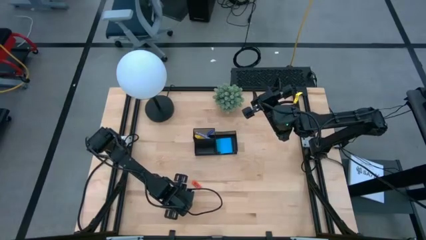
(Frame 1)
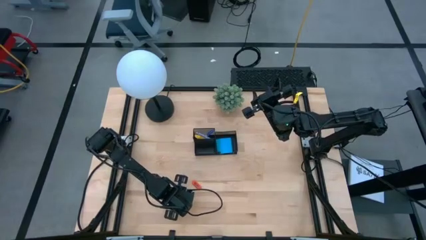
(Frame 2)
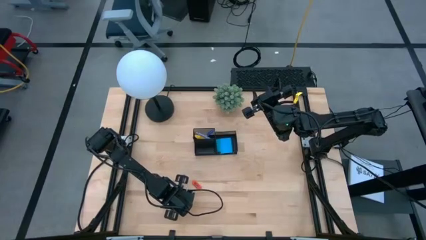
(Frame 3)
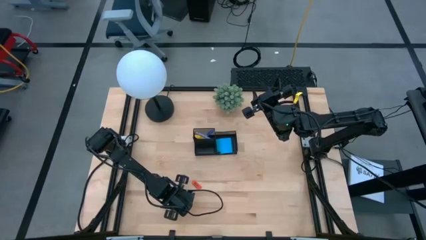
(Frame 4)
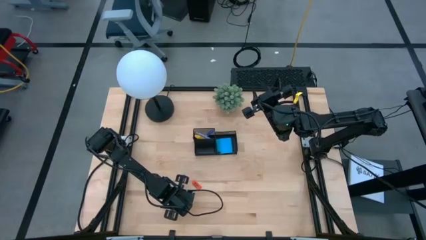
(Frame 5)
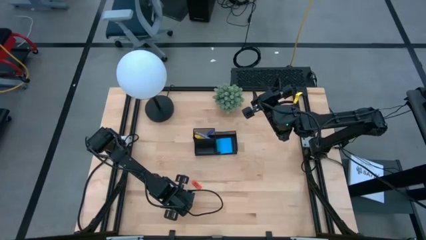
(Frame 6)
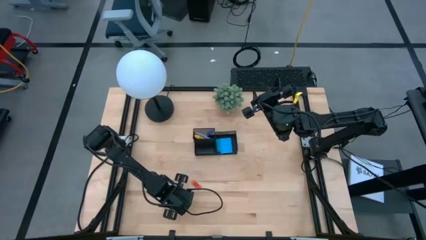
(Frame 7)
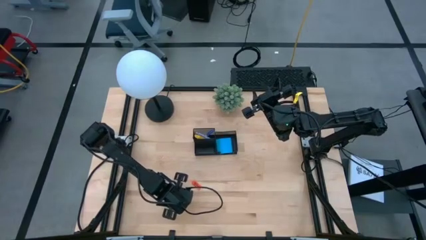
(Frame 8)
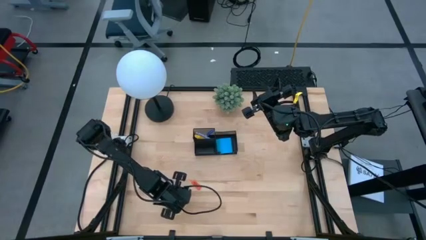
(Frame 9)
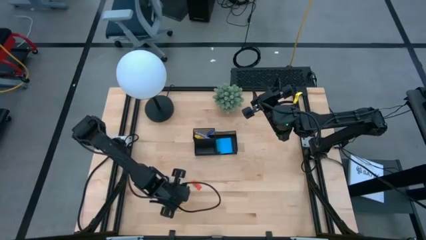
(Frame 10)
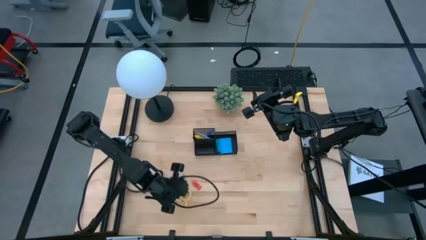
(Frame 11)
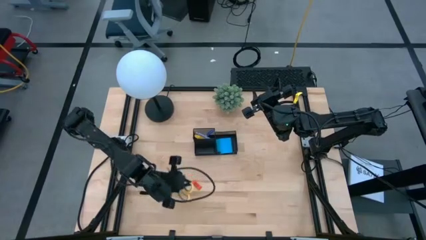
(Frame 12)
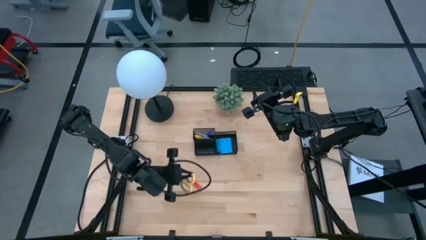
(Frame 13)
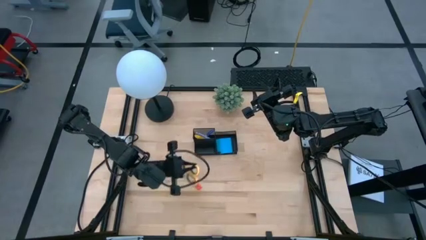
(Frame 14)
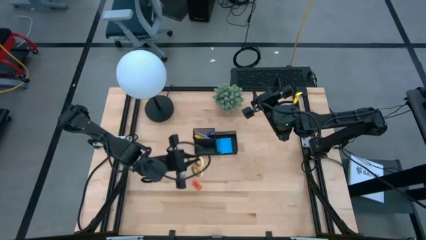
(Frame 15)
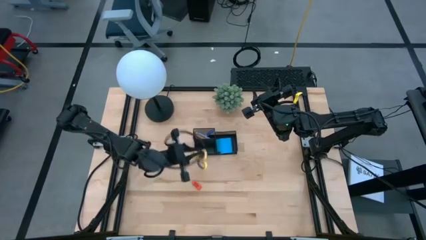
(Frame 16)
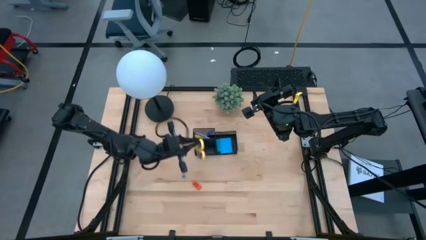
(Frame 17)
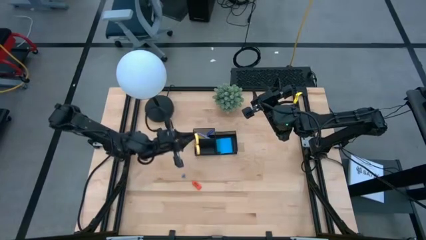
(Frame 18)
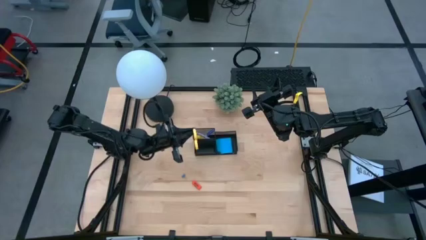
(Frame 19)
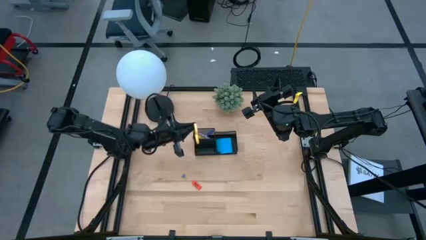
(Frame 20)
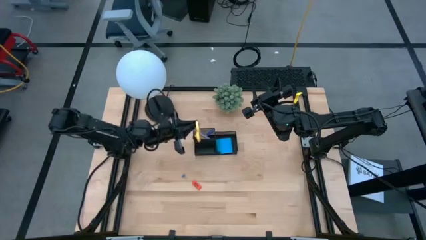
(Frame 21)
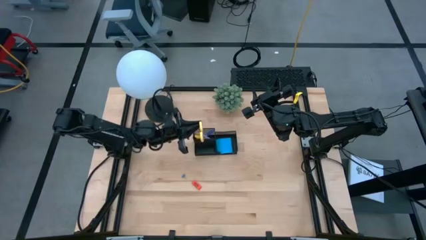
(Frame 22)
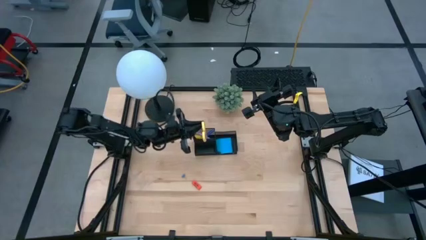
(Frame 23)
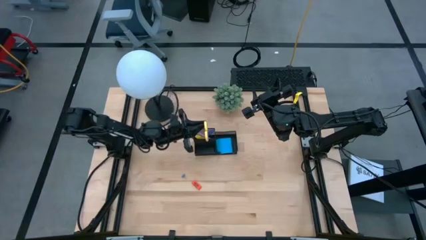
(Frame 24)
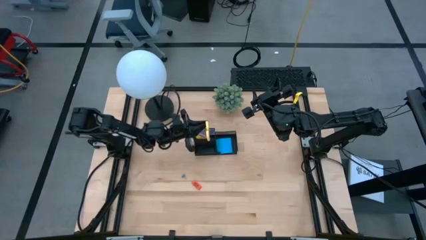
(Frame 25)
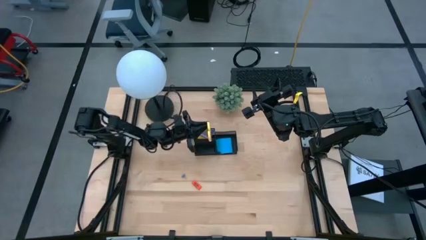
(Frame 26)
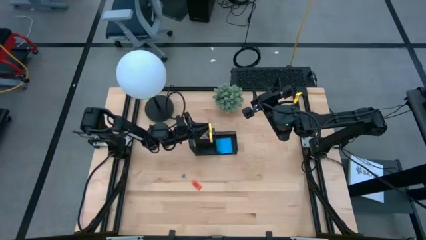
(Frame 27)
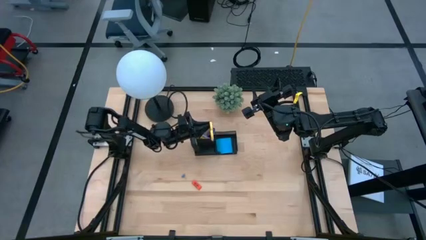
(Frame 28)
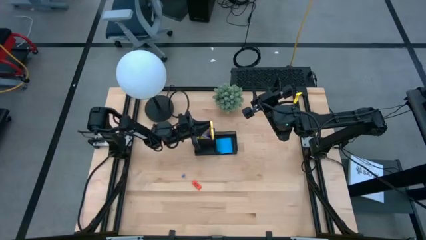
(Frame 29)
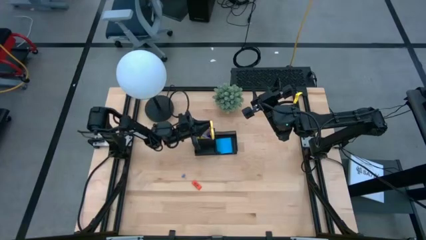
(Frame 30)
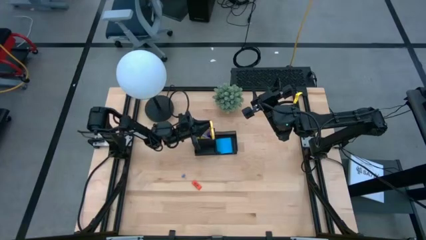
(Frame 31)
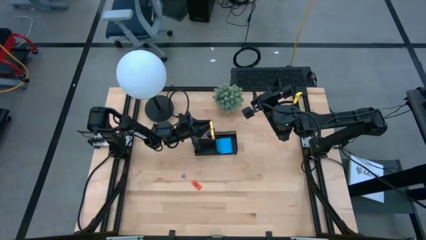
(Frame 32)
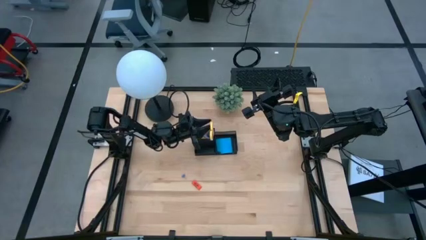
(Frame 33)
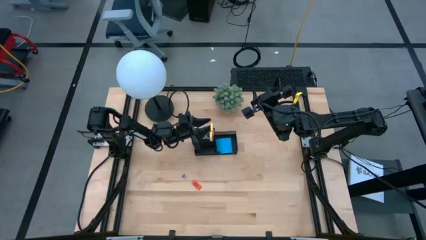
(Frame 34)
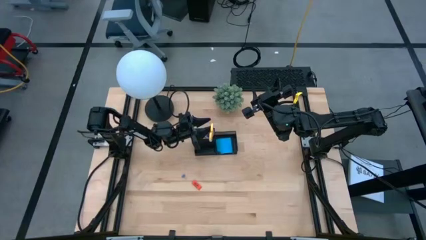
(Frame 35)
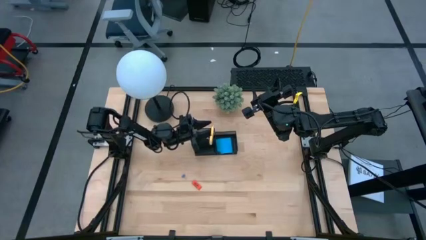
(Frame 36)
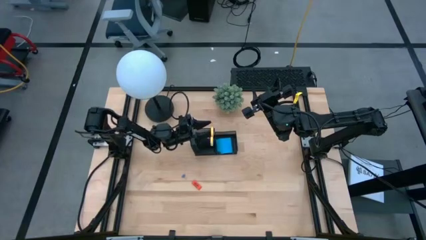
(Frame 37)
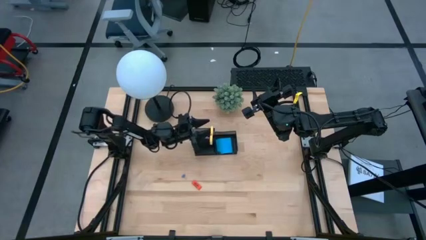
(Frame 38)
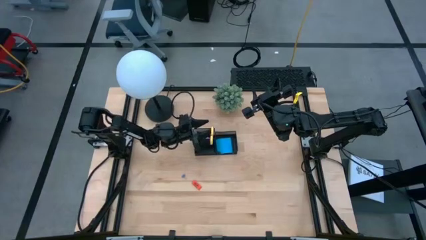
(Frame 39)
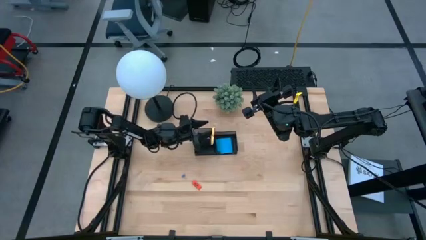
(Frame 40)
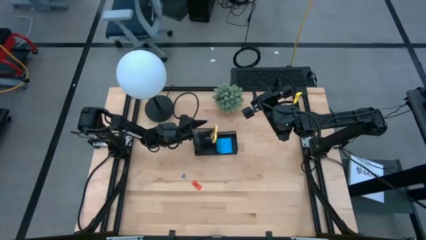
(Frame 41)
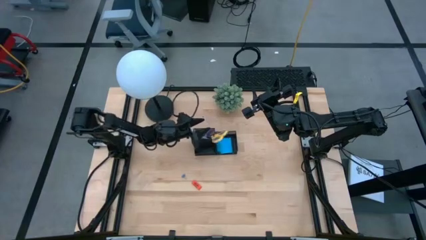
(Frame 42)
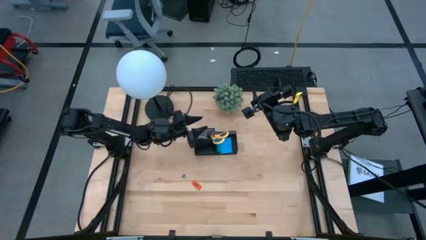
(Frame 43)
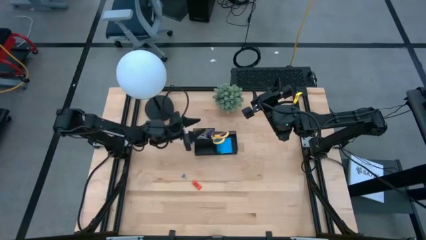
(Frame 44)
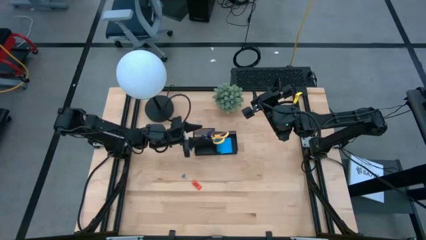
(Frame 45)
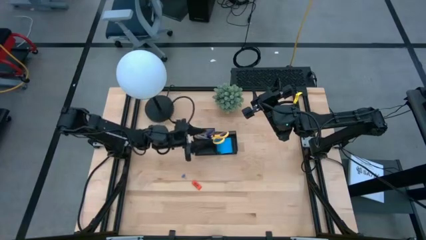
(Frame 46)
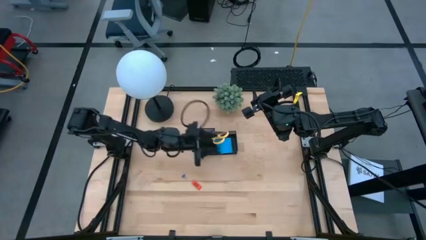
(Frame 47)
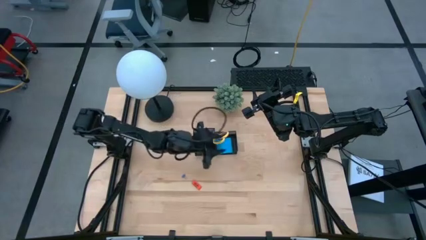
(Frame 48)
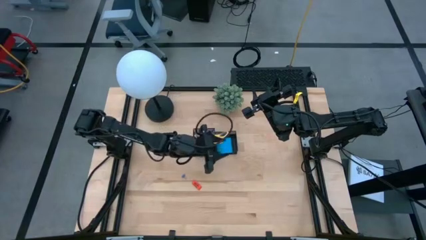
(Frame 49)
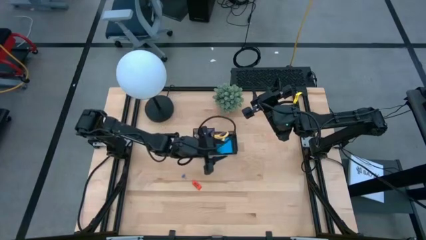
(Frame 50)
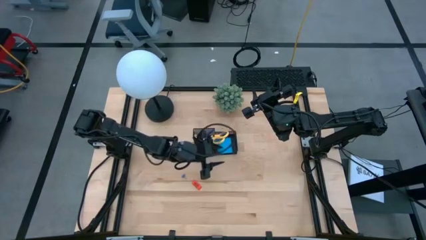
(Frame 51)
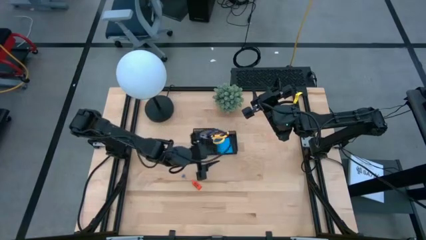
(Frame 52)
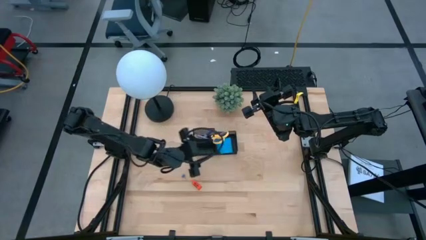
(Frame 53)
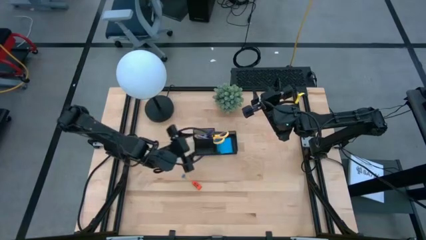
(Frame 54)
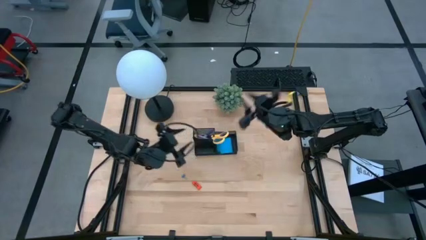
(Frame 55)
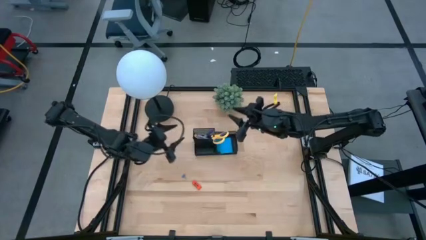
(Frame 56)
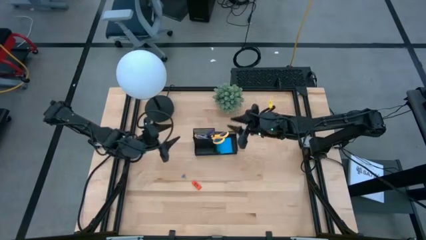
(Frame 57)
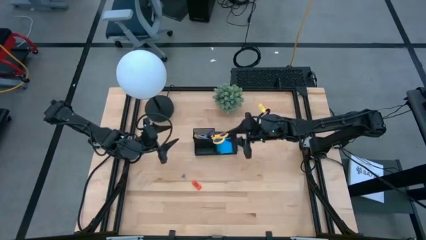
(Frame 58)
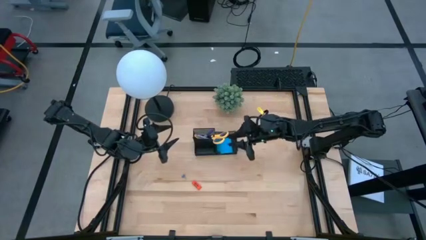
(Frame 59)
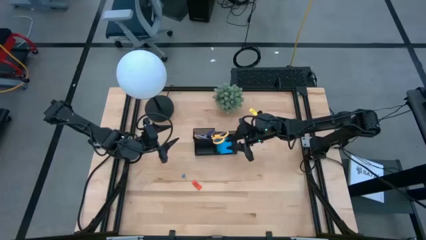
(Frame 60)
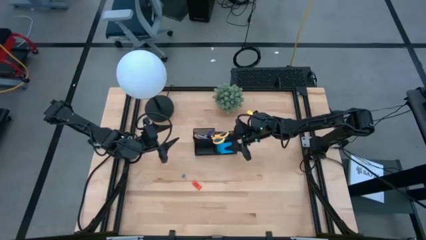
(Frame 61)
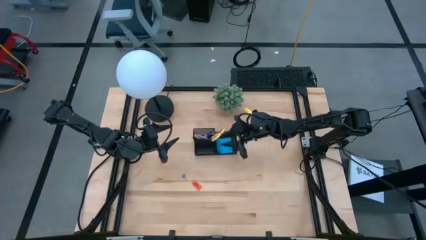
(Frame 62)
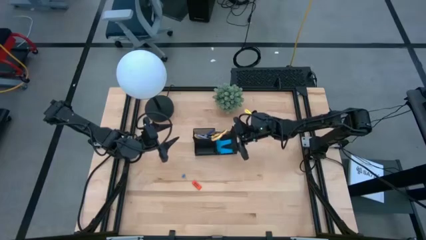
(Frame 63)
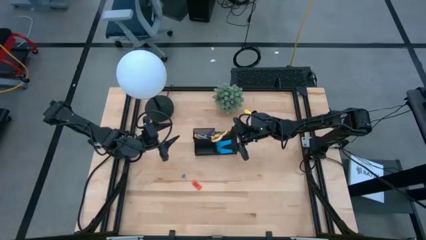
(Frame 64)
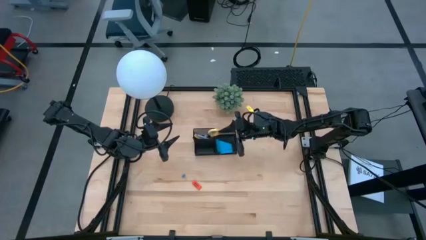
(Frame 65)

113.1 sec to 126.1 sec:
Task: Pick and place office supplies into organizer
Put the scissor into the desk organizer
